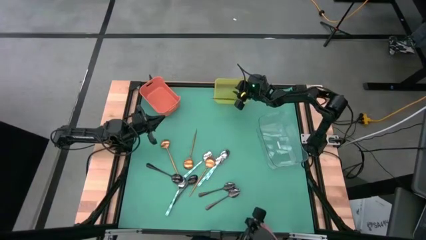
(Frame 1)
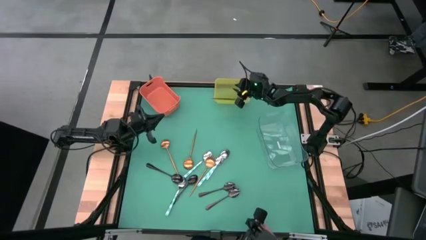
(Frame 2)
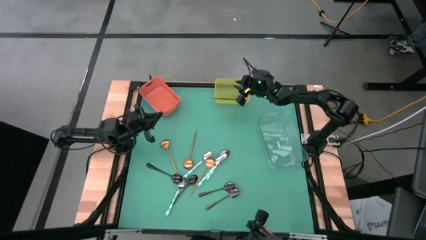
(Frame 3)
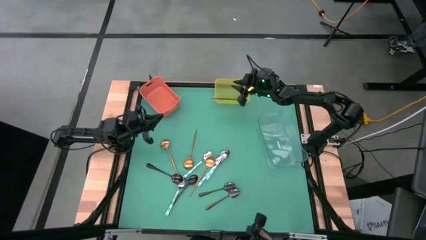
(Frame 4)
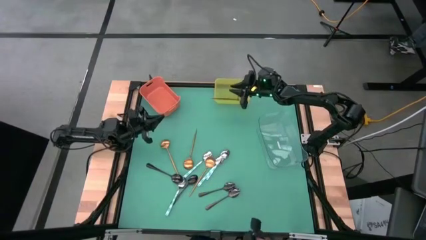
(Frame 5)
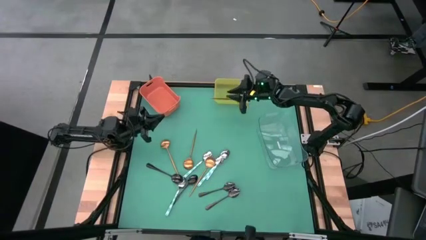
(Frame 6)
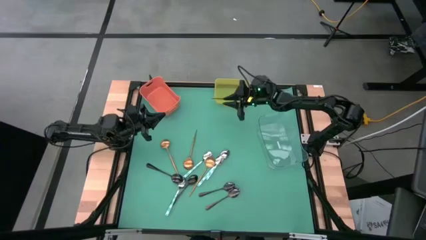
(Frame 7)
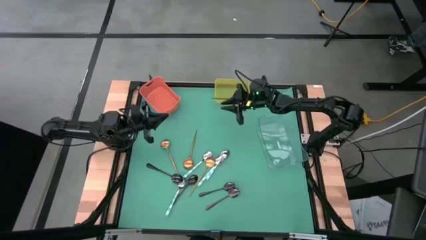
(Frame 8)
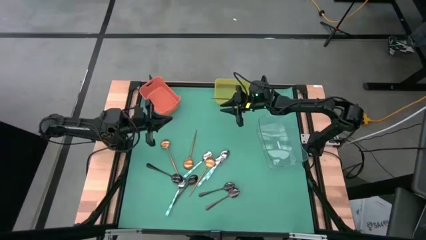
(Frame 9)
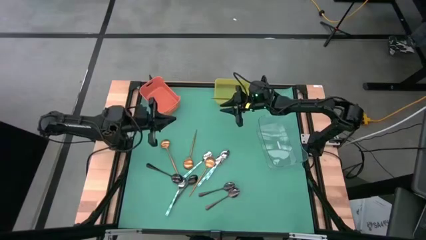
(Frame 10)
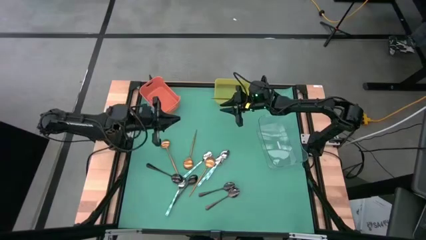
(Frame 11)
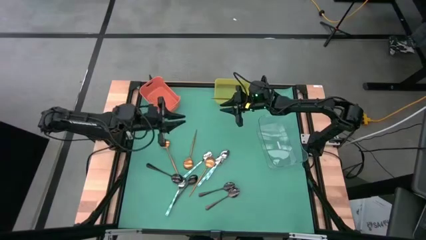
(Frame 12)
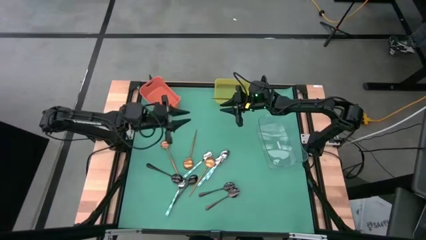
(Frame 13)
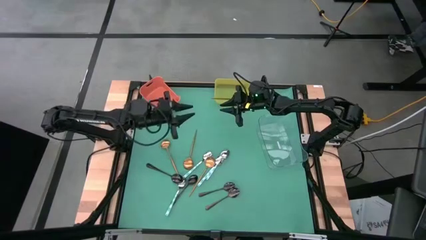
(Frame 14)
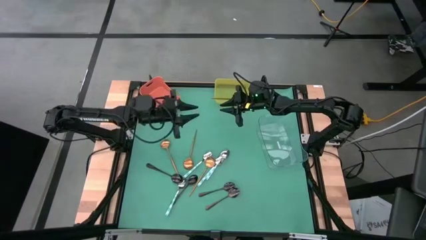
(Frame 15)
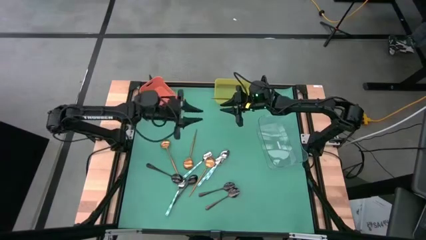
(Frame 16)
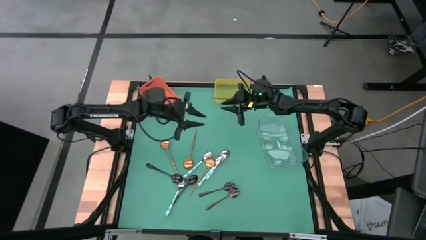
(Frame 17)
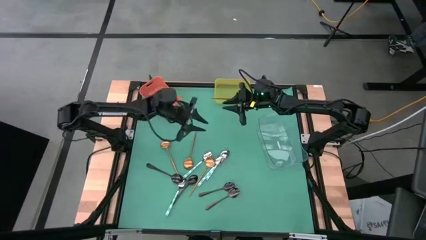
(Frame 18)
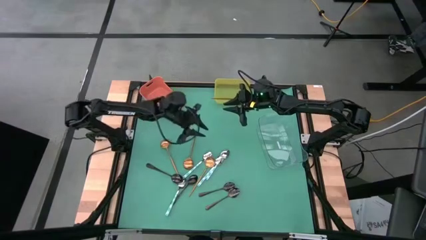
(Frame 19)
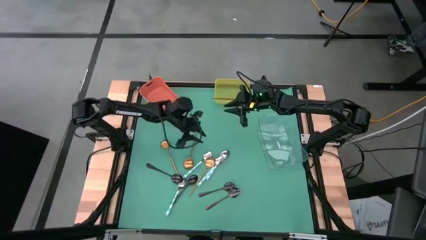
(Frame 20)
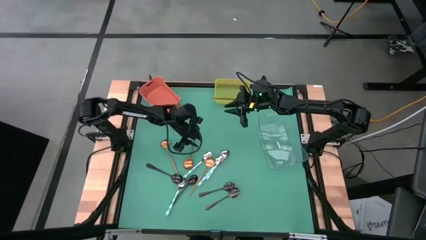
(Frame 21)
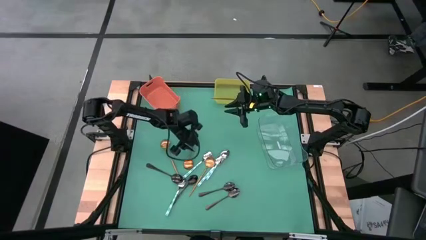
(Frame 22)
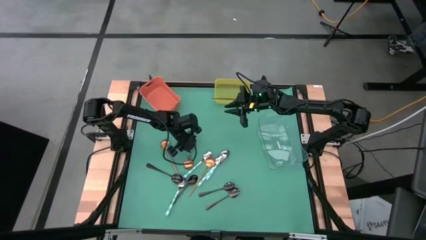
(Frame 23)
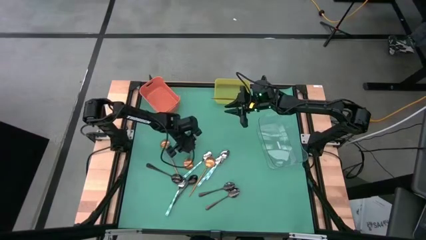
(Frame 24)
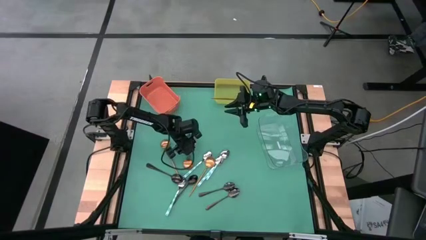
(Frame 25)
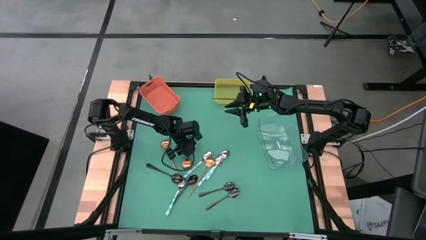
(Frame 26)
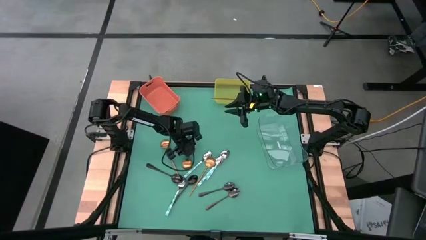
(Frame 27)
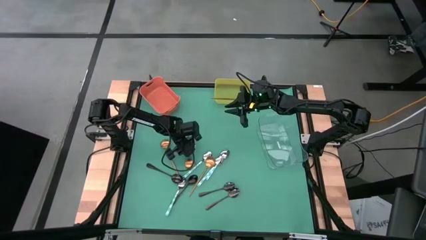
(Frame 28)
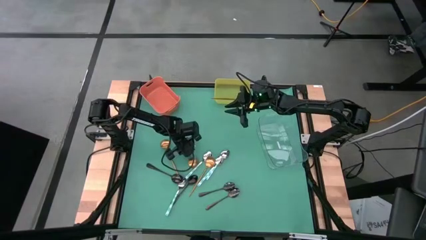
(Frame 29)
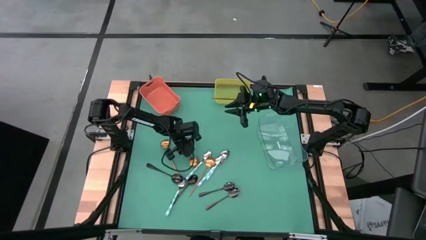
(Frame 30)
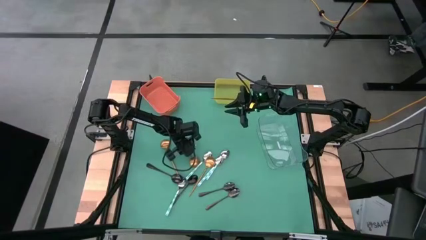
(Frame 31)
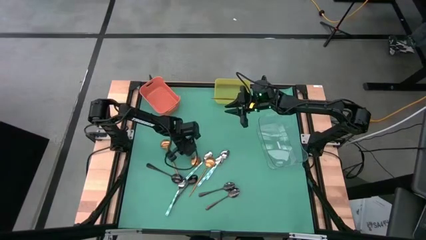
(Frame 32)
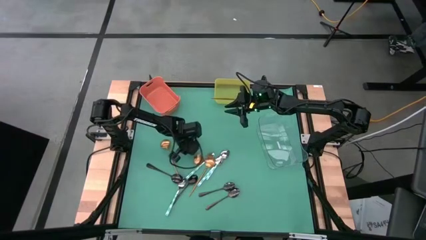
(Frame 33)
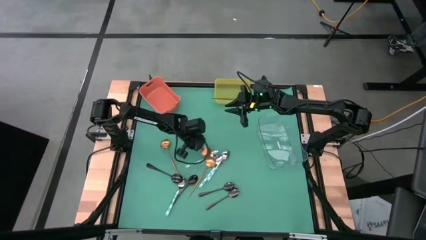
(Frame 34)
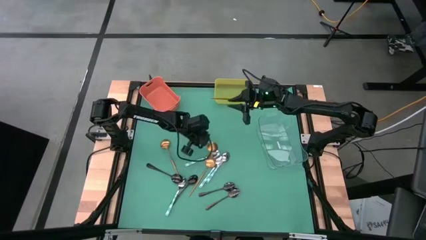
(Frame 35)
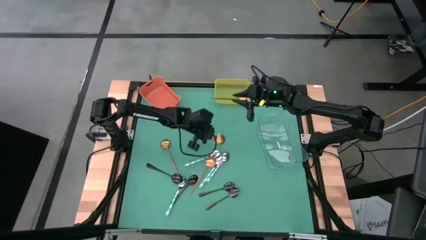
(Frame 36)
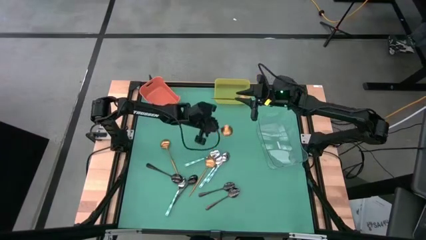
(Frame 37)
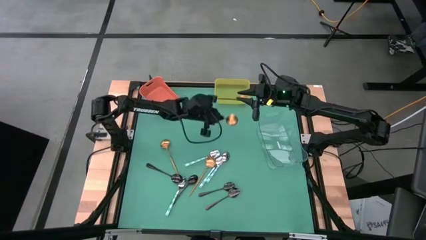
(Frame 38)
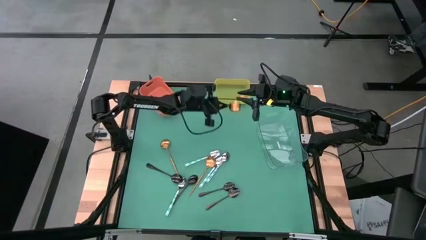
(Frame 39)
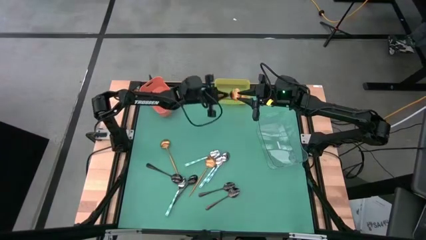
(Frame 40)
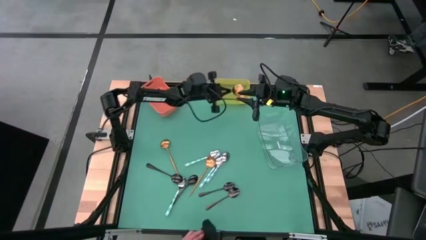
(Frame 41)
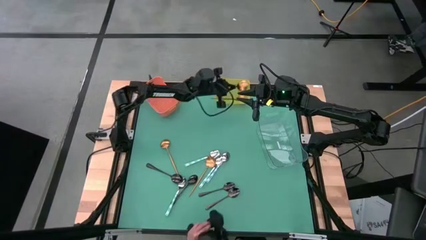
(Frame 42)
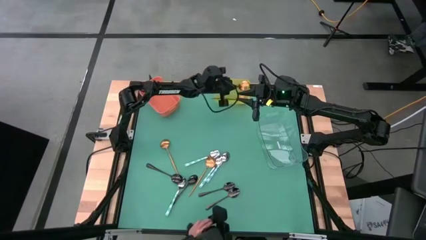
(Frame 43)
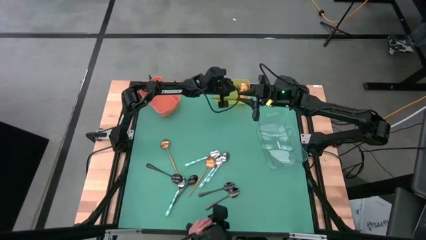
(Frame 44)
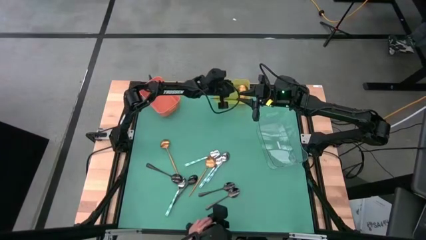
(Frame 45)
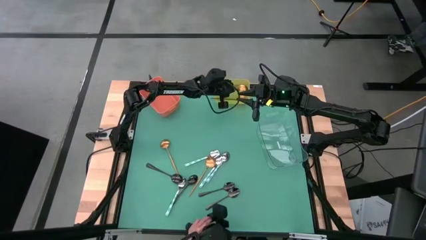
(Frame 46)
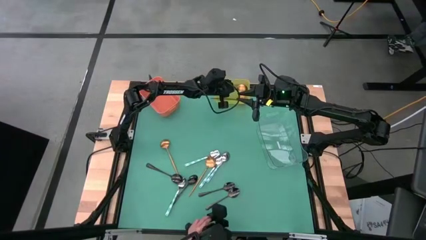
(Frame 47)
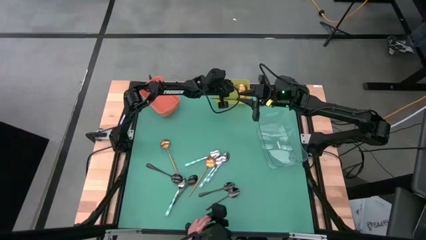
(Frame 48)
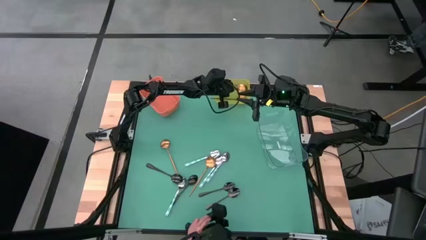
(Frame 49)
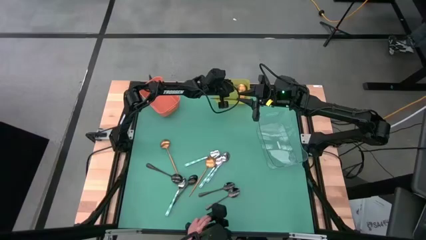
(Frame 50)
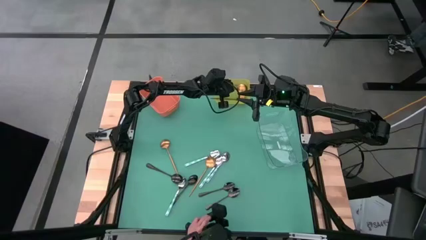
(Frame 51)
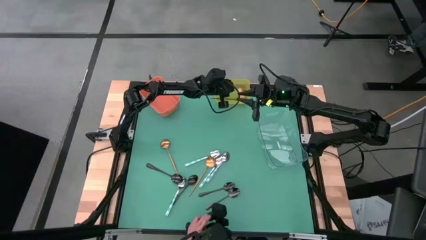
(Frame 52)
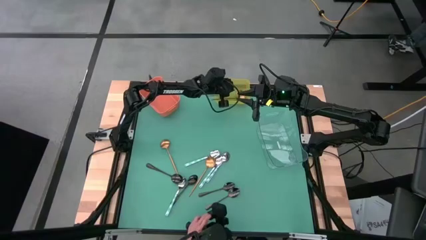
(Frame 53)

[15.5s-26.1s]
Task: Sort silverware by color (type)
Put the gold spoon into the yellow bin

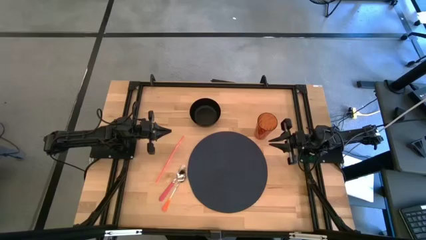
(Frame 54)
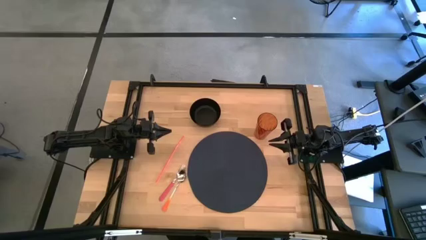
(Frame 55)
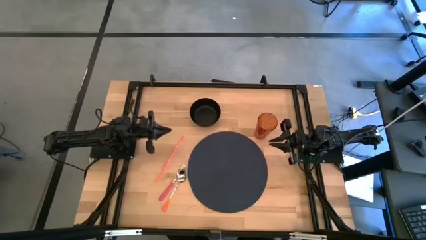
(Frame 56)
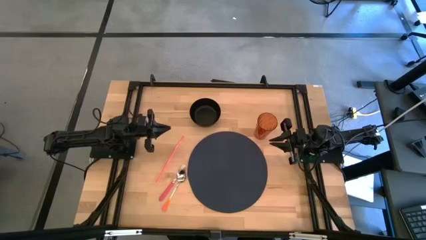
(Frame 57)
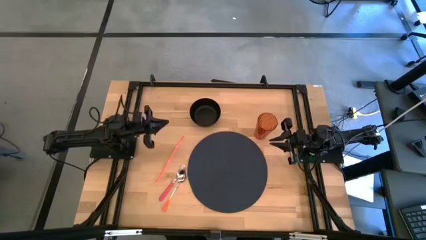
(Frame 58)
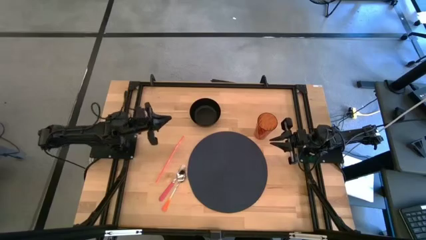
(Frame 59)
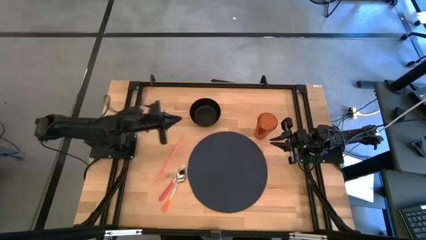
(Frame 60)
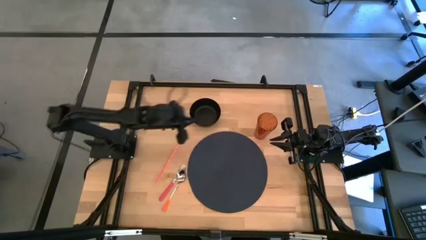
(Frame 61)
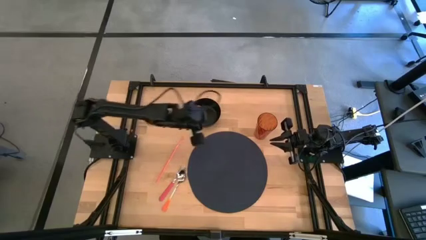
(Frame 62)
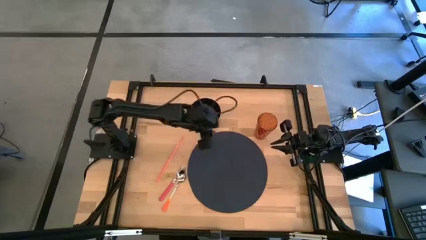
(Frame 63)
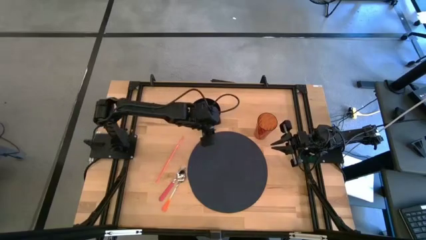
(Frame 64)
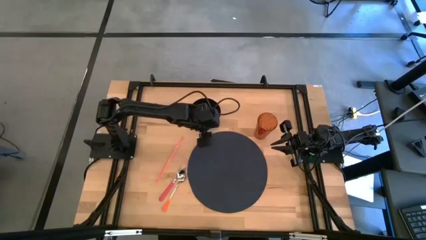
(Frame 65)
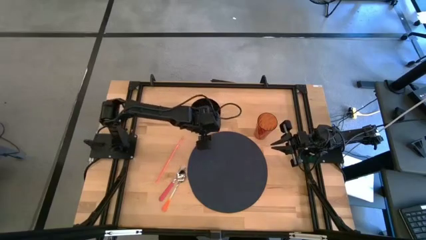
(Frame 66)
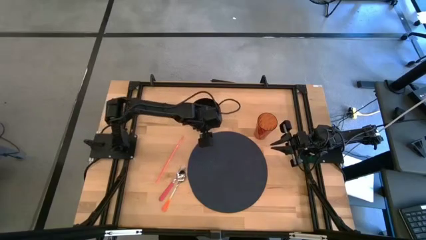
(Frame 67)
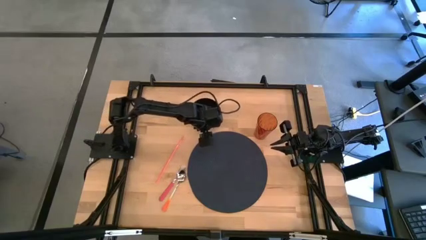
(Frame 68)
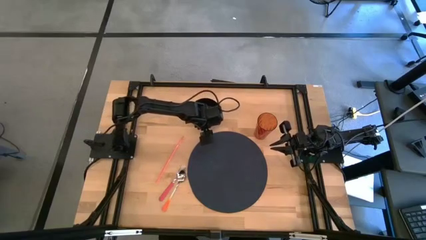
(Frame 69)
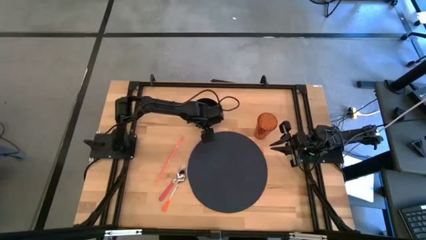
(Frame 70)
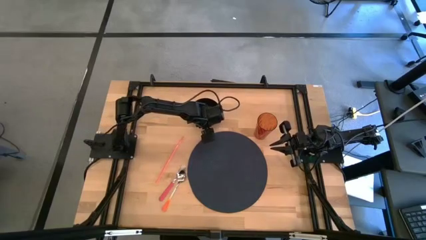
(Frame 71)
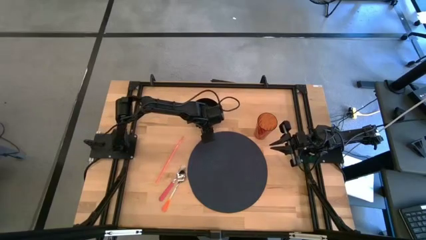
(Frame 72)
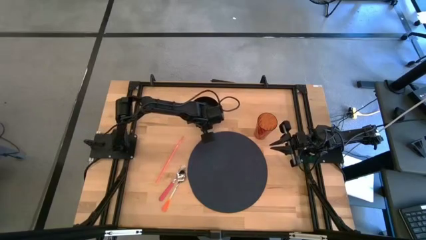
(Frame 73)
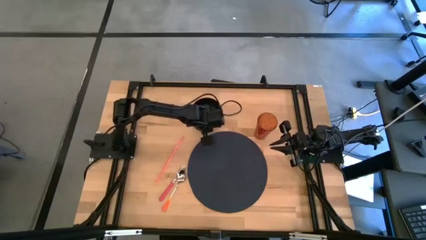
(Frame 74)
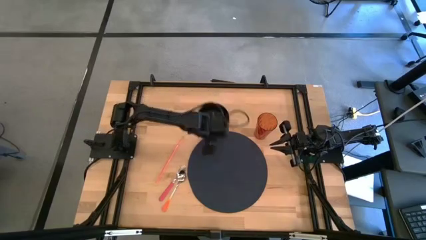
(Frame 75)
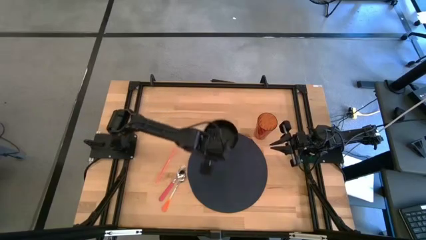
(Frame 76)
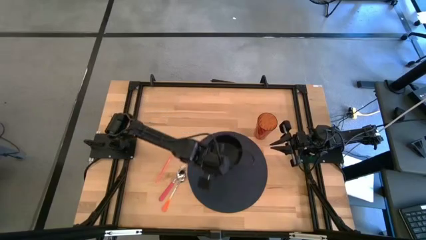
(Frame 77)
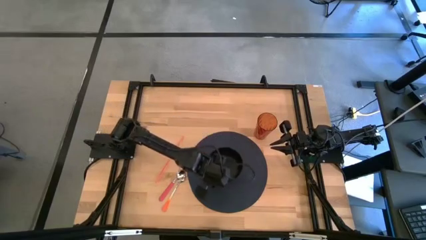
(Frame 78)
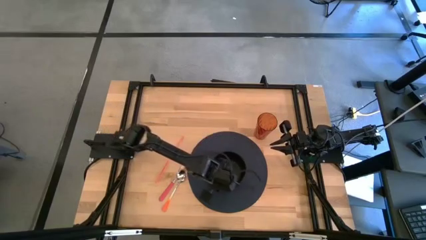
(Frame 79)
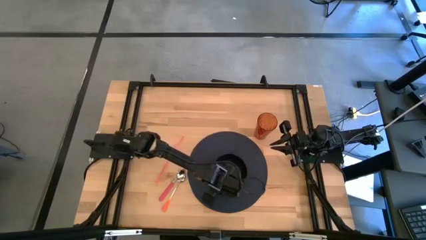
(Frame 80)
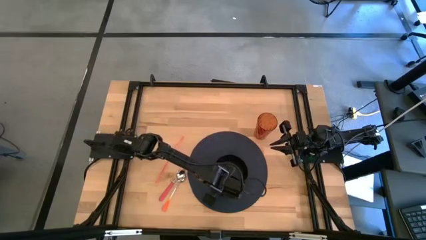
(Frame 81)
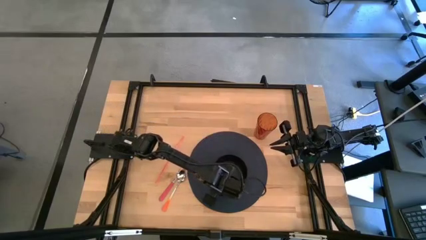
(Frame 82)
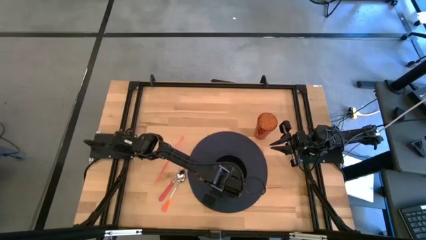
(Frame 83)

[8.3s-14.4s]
Task: Pick & Place Utensil
Put the black bowl on the center of the black mat
